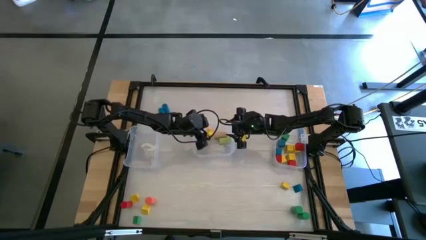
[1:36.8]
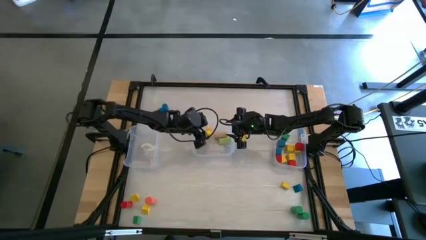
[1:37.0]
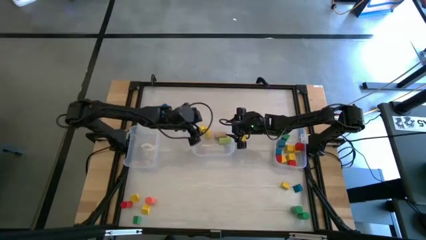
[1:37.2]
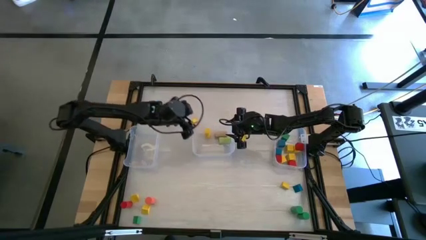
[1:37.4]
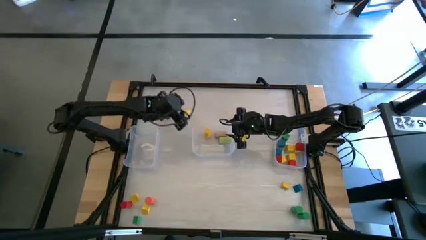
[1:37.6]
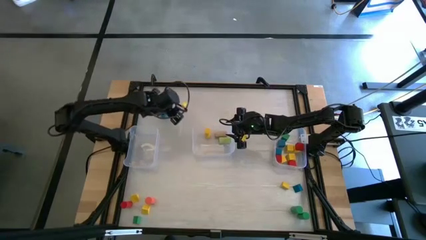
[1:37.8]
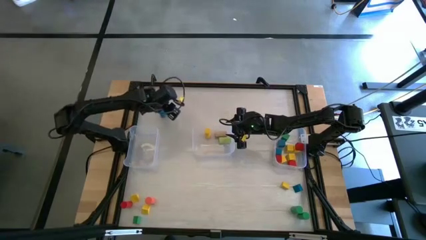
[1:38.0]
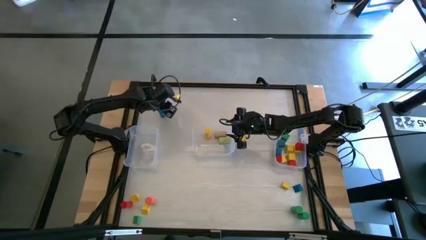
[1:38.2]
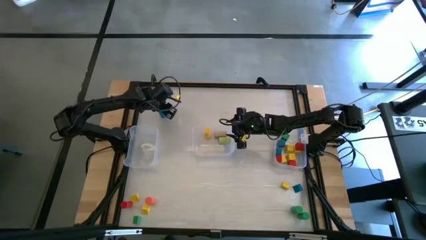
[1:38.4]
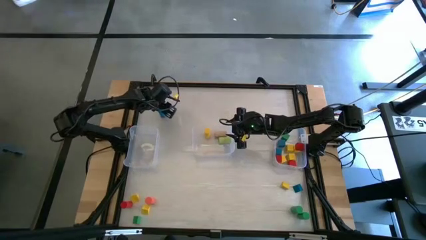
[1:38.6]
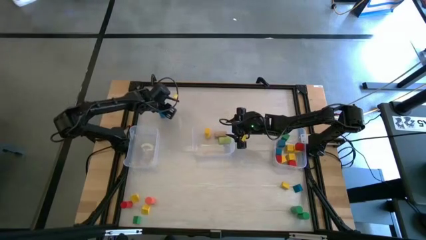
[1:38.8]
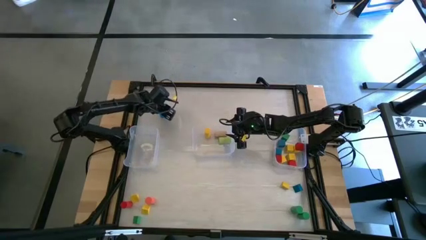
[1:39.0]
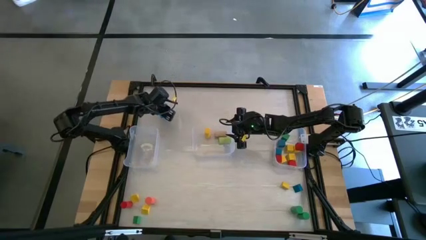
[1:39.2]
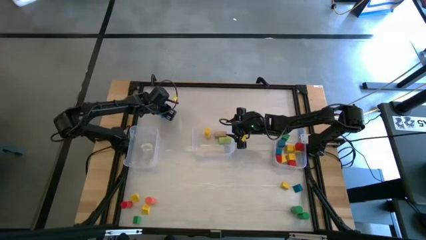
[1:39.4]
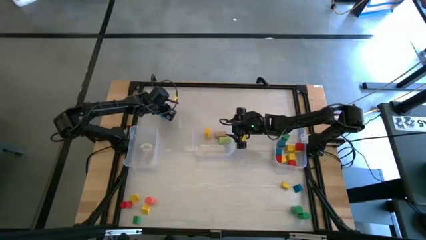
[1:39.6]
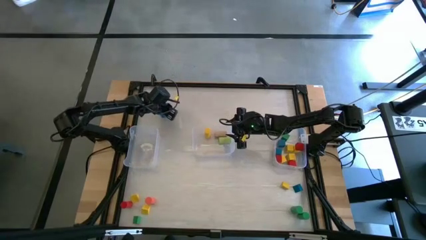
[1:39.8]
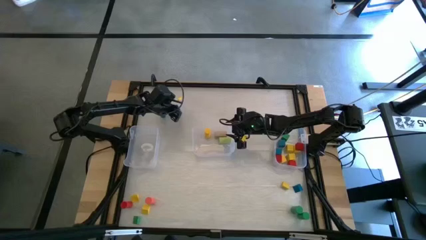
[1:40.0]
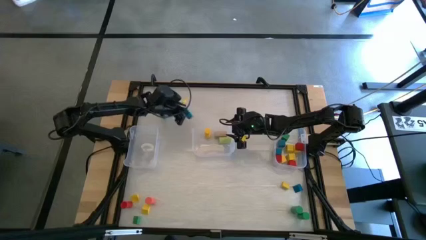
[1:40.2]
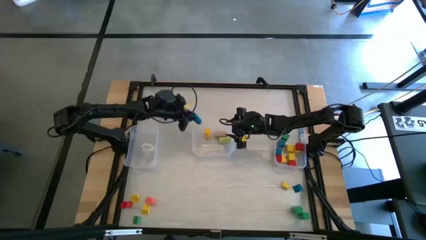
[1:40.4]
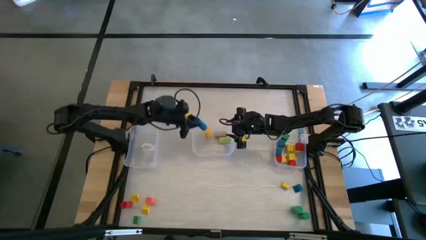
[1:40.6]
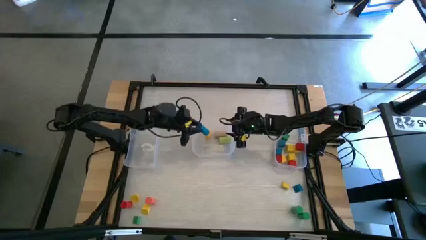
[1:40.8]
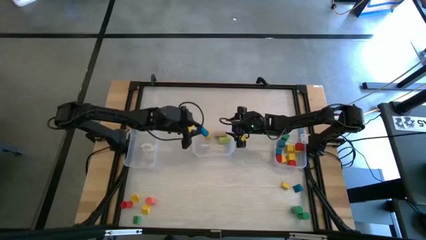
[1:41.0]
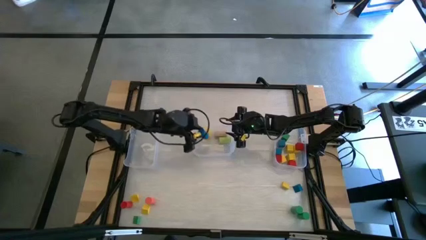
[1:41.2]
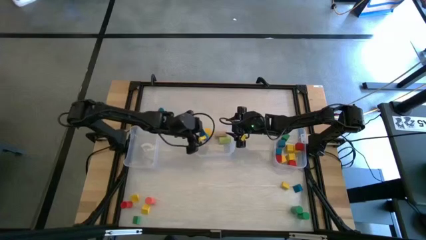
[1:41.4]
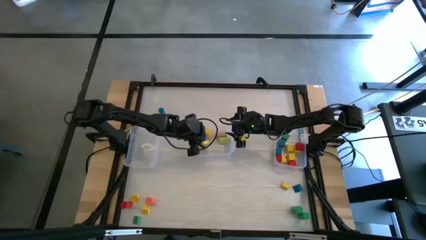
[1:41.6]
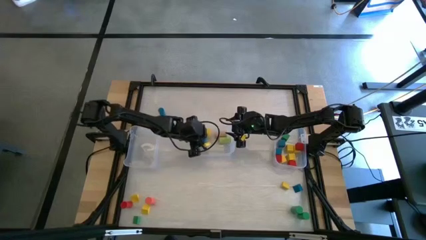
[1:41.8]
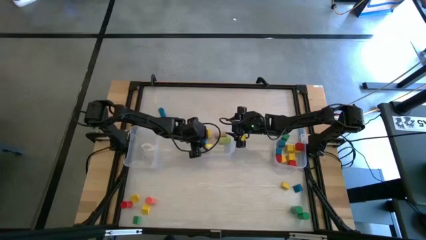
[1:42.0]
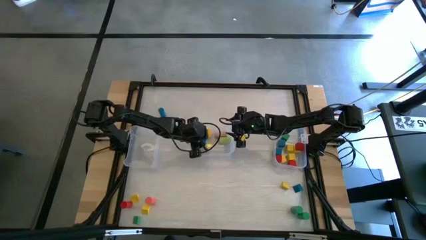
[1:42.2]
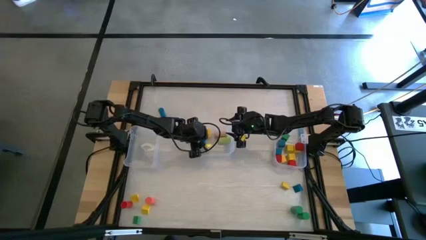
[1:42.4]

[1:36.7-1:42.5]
Task: Sort blocks by size
Put the blue cylinder block into the center transparent bin

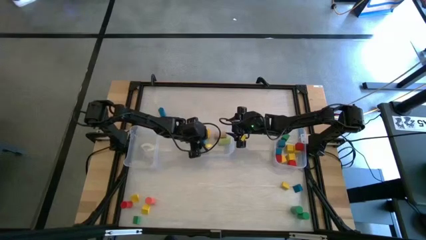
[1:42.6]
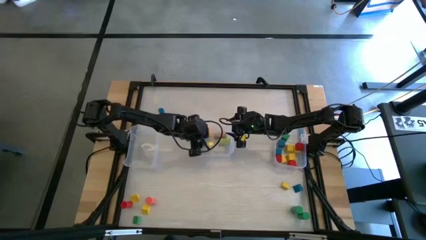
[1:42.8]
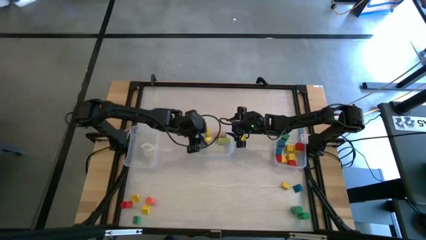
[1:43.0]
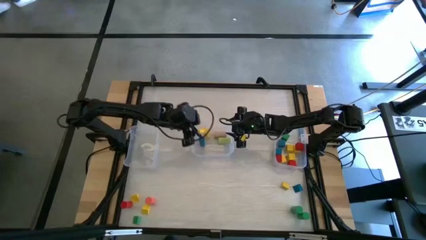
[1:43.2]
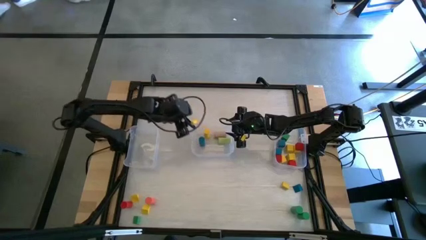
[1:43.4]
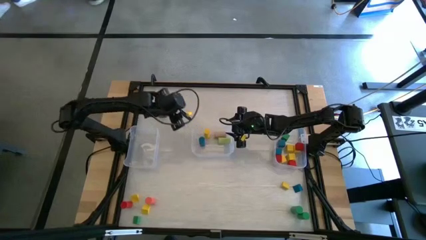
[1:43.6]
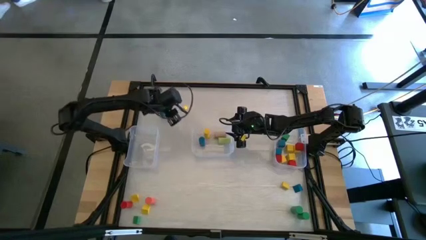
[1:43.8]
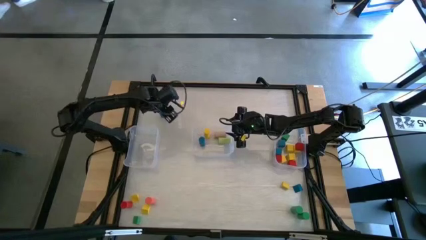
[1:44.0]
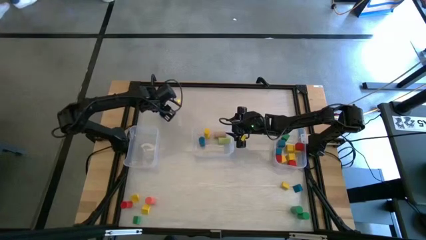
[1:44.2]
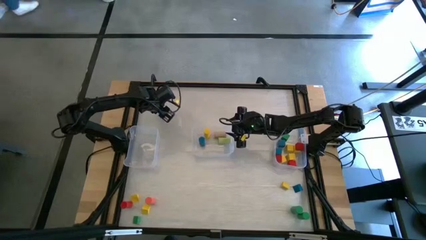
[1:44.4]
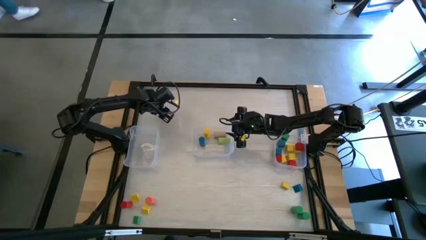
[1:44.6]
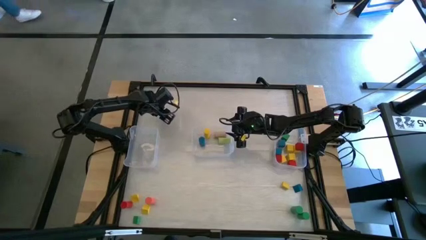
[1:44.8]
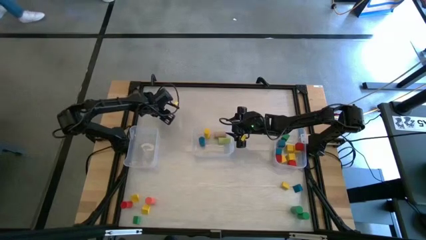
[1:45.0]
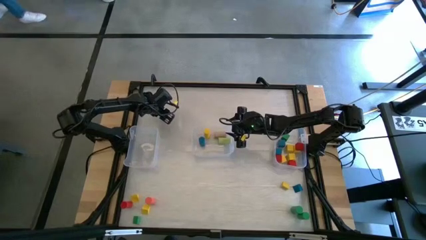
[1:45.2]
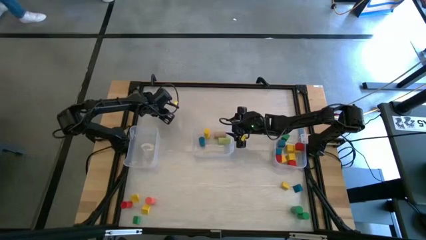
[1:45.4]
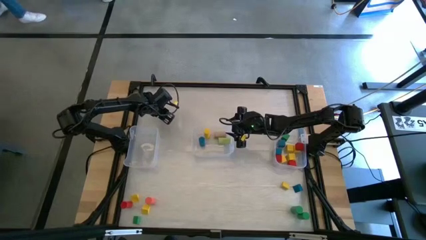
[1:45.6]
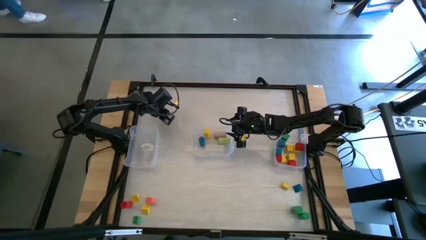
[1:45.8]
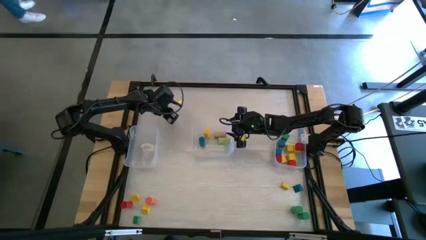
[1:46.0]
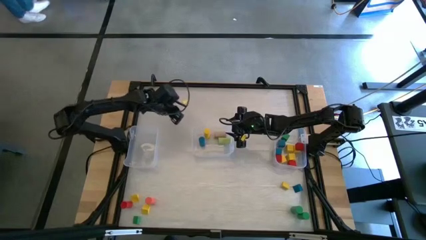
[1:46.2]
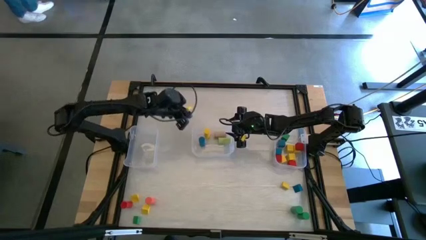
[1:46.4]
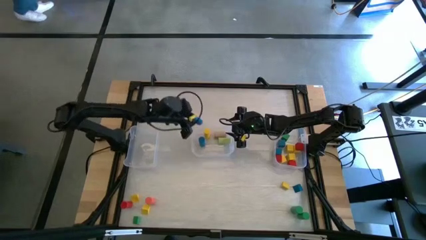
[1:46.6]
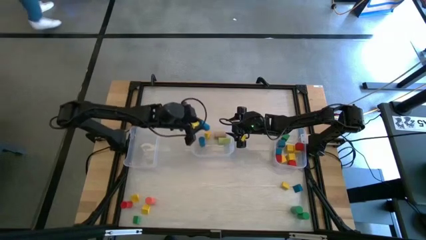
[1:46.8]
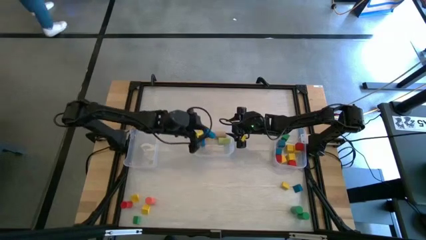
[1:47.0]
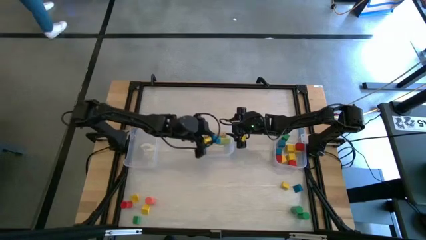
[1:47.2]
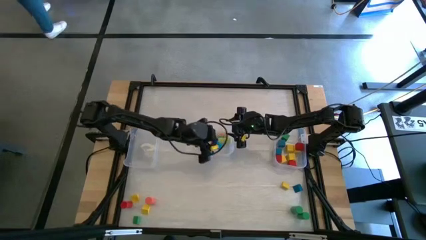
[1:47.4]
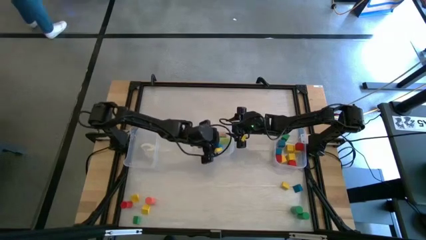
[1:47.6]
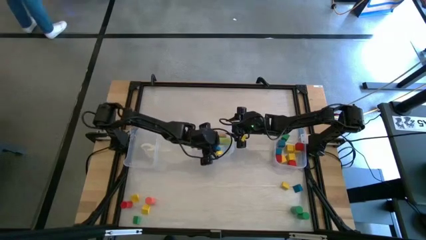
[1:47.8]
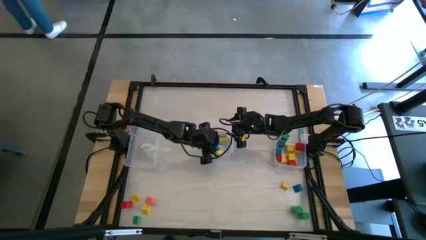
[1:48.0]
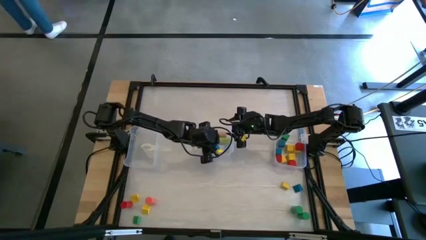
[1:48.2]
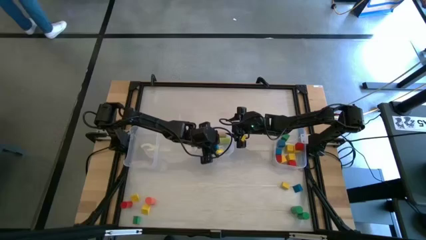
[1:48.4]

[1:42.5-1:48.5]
Put the blue cylinder block into the center transparent bin

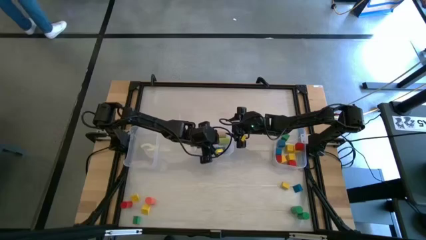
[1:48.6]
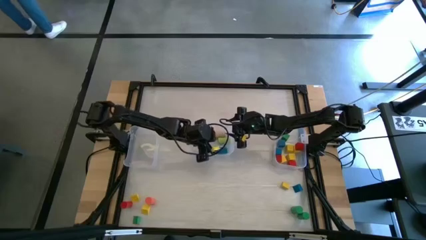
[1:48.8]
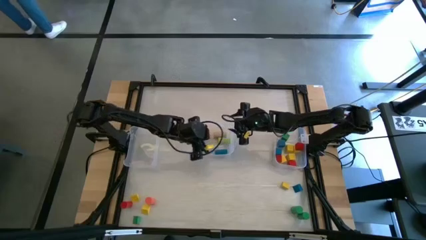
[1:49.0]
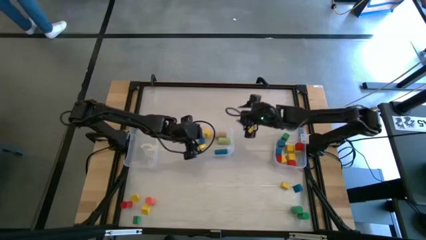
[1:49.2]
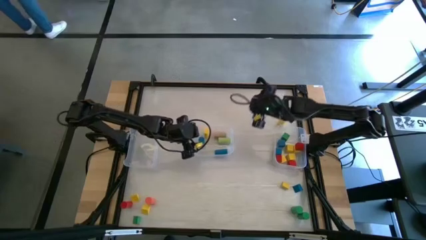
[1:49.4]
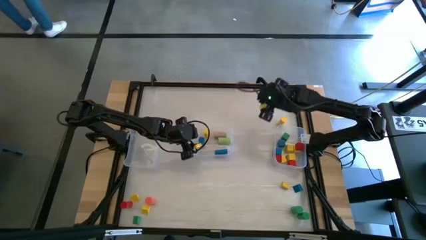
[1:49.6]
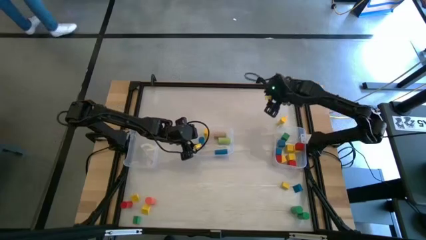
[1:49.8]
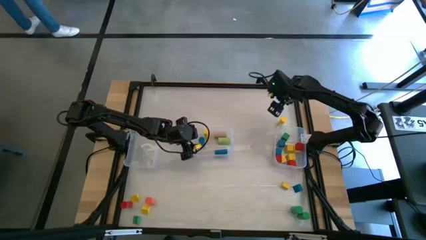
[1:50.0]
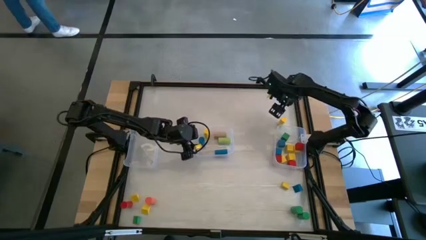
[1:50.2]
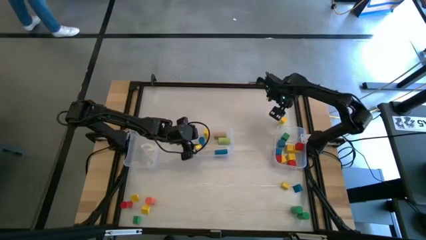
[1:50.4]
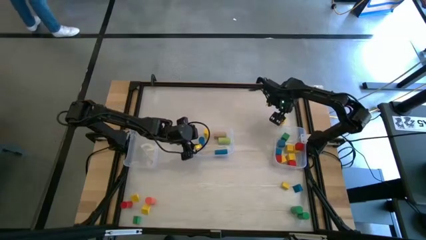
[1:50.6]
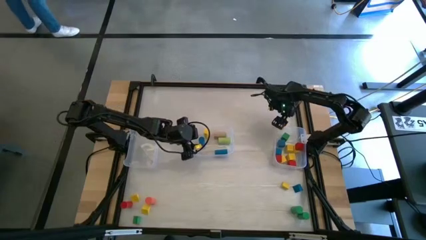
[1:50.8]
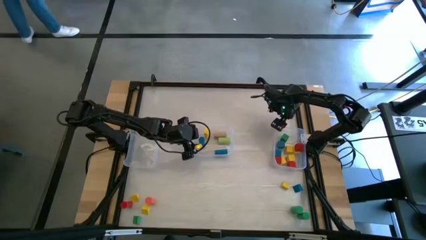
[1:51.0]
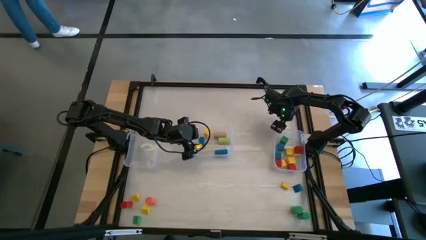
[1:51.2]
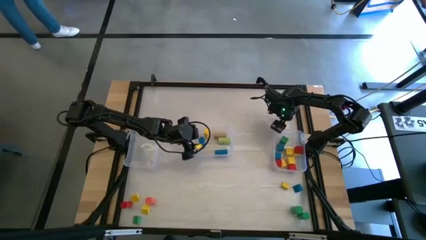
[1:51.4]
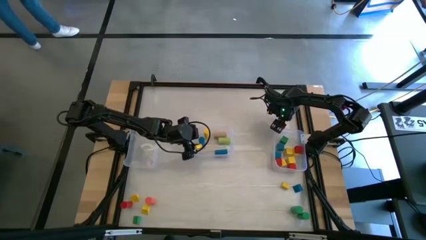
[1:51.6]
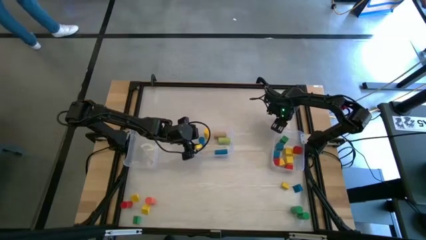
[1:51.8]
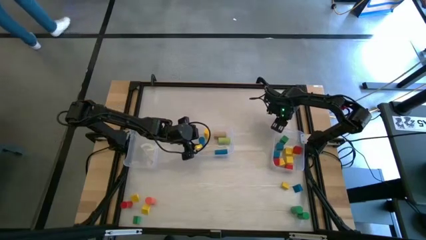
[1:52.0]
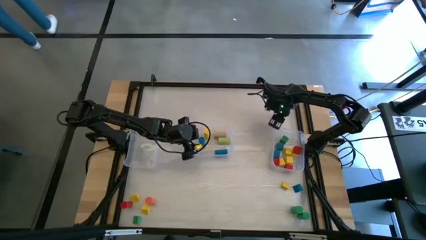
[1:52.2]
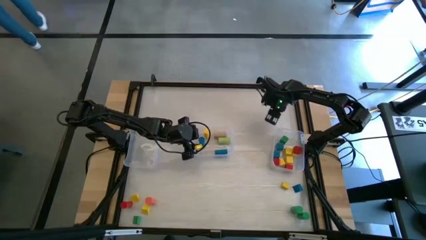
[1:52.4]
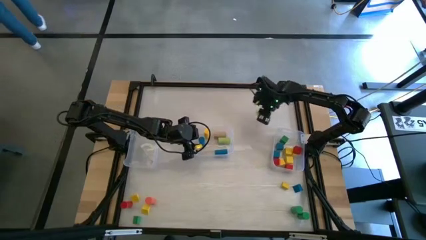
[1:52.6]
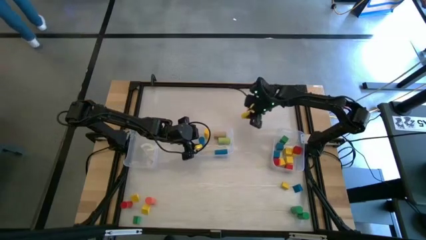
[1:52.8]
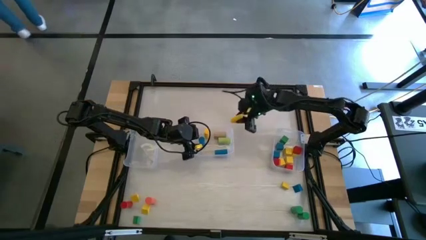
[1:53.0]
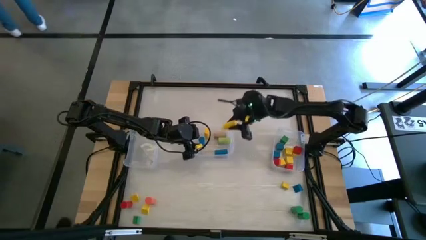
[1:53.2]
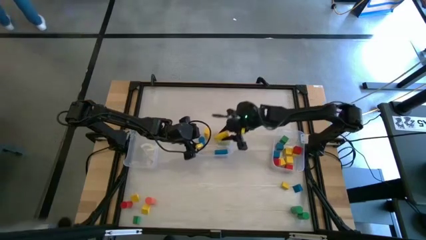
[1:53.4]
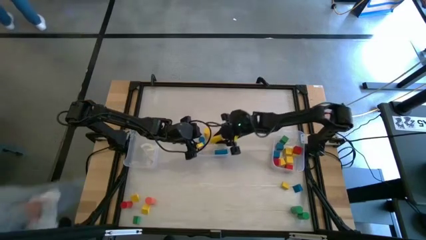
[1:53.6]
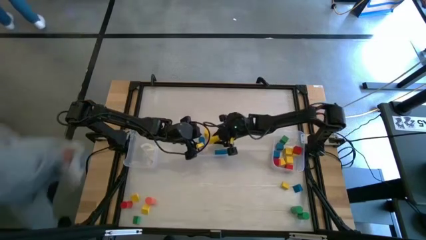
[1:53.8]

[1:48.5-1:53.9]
Put the yellow cylinder block into the center transparent bin

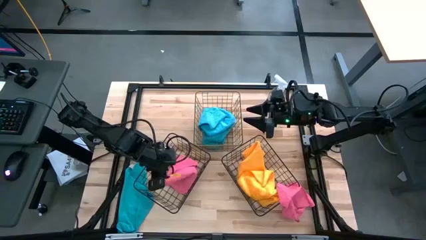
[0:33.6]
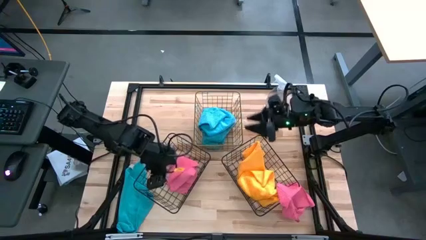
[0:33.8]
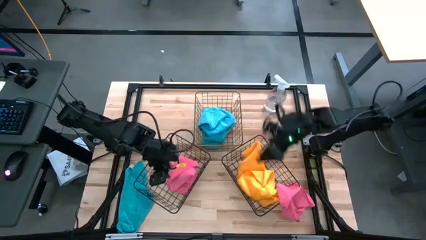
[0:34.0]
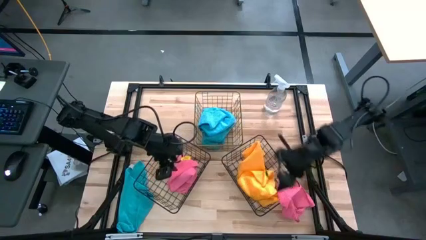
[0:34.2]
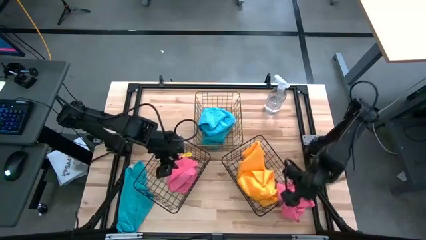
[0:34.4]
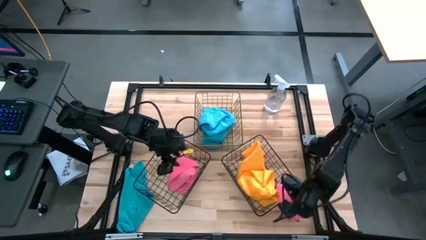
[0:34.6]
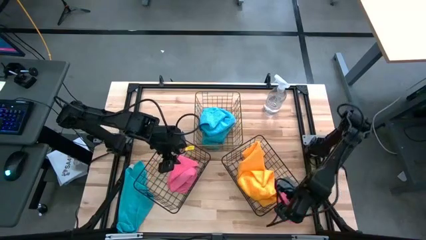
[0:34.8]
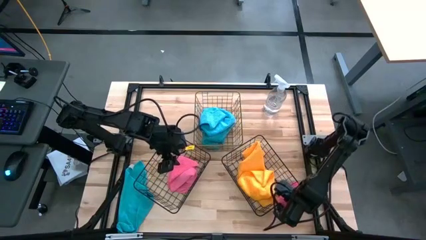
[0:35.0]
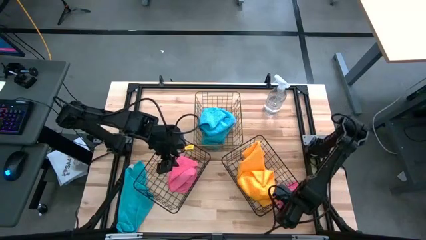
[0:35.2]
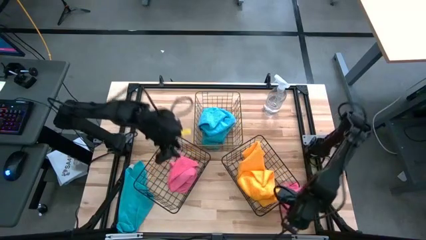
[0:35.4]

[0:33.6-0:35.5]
Task: Sort microfiber towel by color & place in baskets
Put the pink microfiber cloth into the bottom left wire basket
